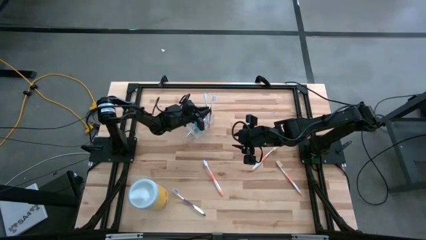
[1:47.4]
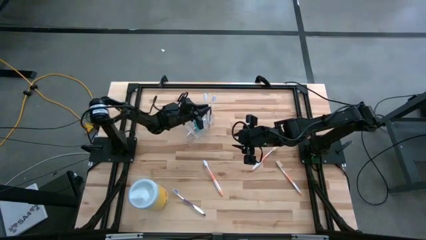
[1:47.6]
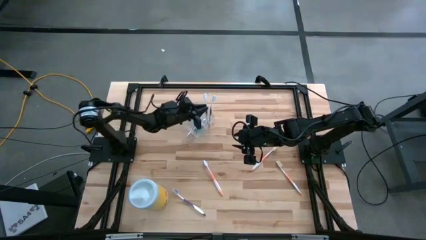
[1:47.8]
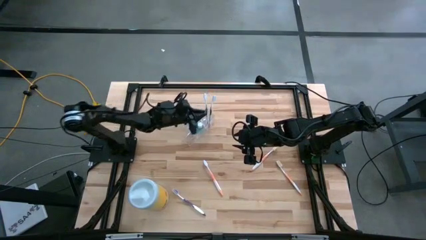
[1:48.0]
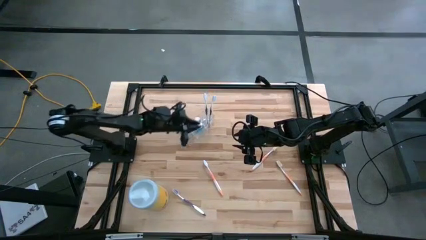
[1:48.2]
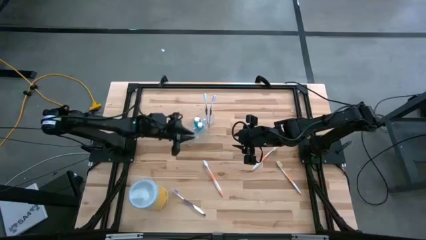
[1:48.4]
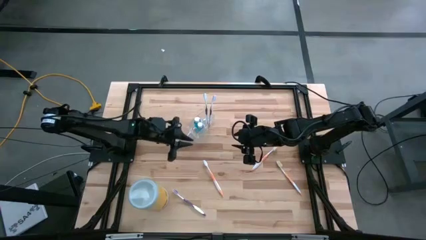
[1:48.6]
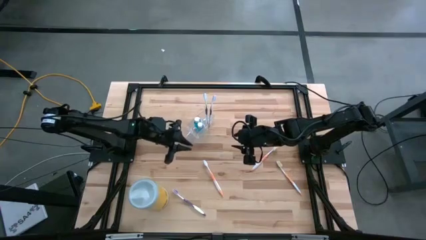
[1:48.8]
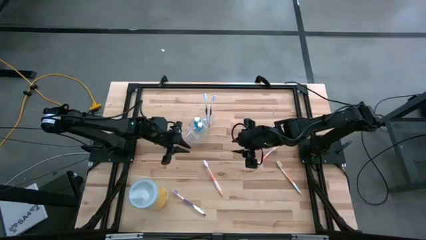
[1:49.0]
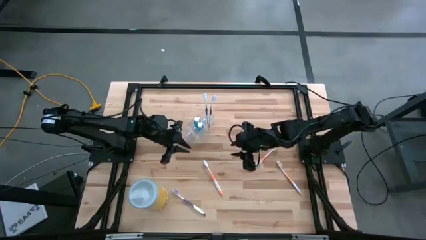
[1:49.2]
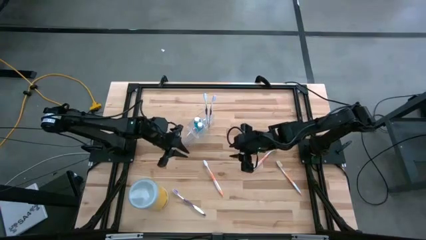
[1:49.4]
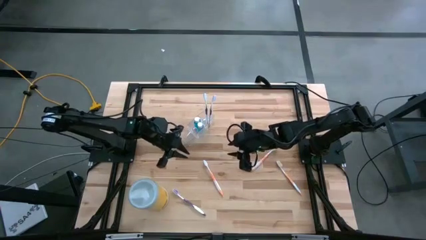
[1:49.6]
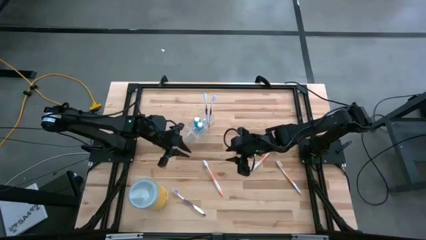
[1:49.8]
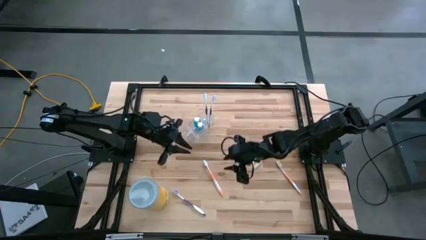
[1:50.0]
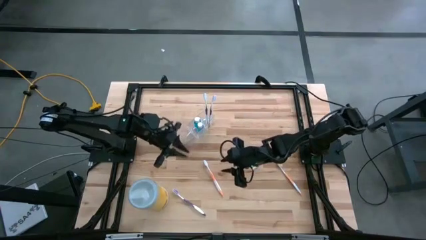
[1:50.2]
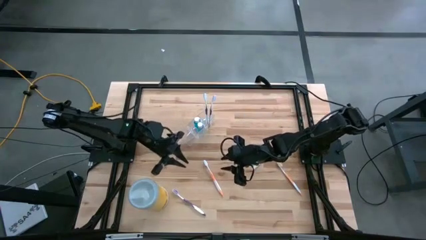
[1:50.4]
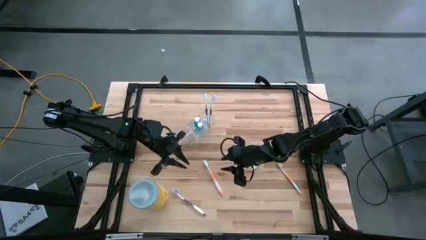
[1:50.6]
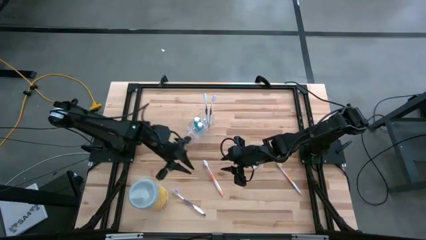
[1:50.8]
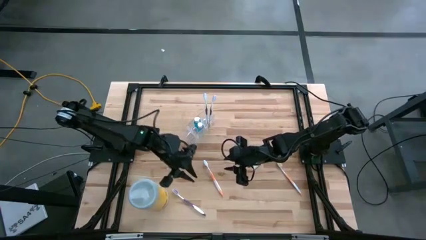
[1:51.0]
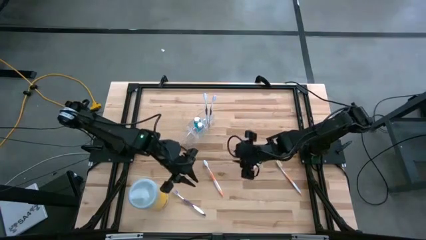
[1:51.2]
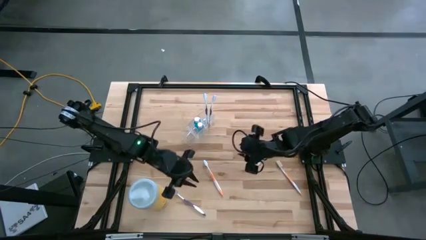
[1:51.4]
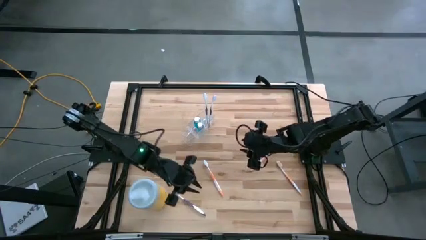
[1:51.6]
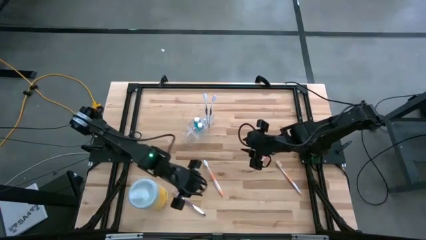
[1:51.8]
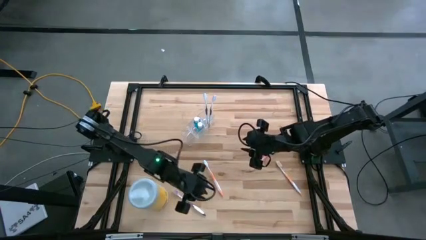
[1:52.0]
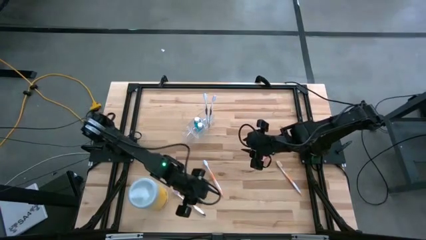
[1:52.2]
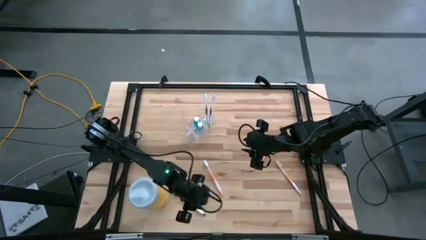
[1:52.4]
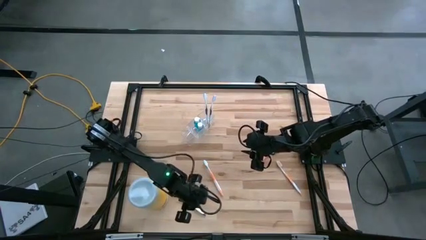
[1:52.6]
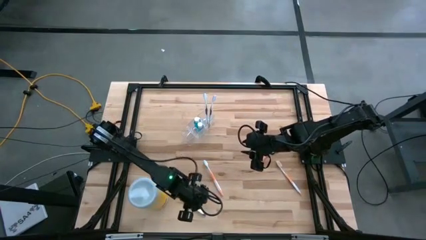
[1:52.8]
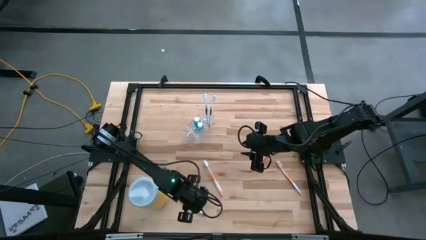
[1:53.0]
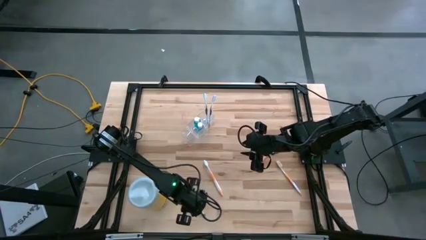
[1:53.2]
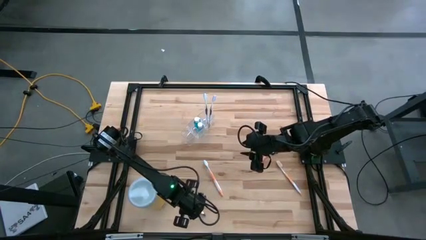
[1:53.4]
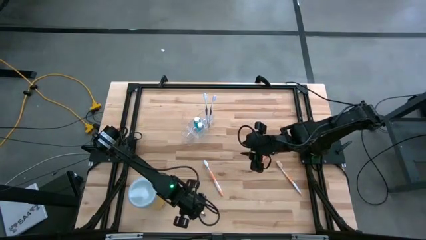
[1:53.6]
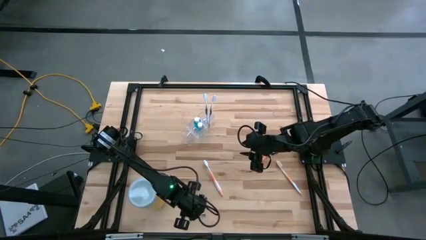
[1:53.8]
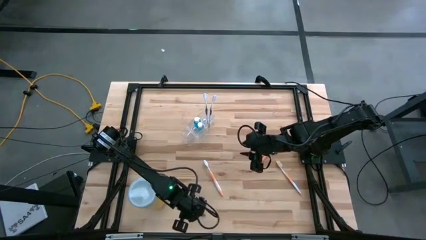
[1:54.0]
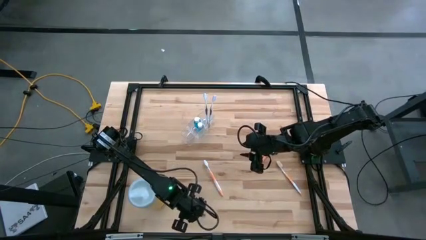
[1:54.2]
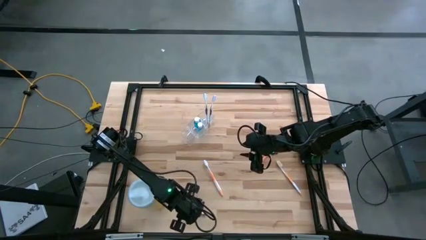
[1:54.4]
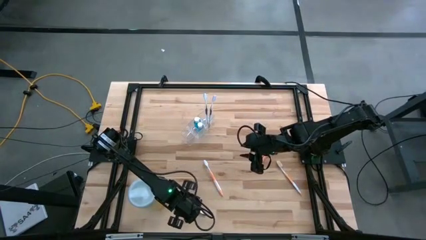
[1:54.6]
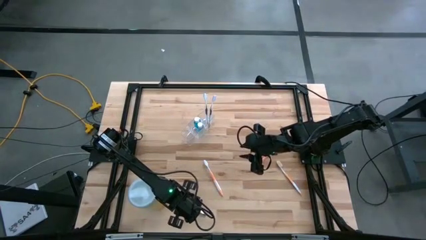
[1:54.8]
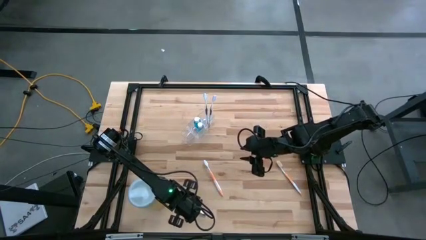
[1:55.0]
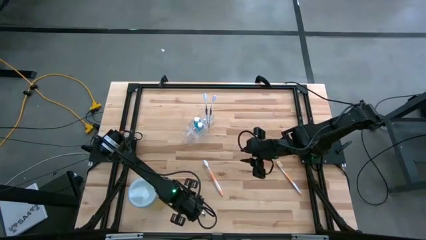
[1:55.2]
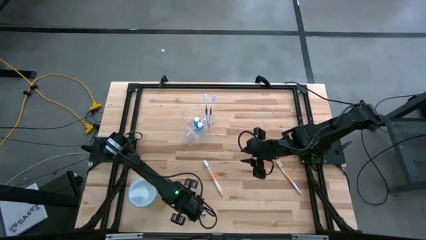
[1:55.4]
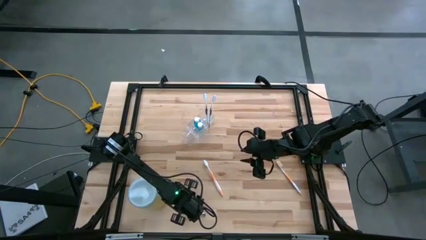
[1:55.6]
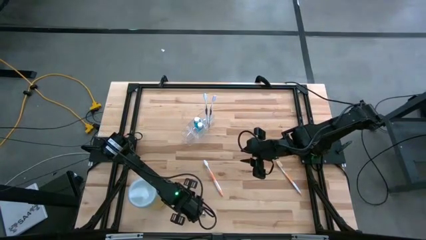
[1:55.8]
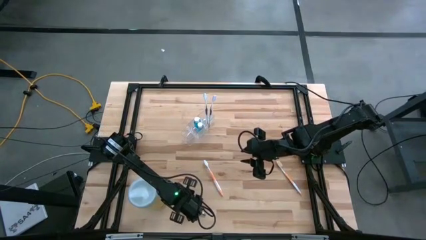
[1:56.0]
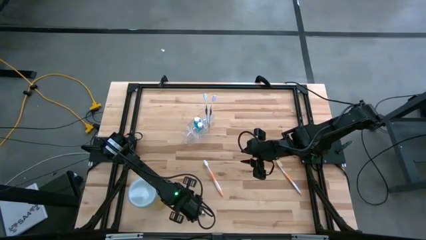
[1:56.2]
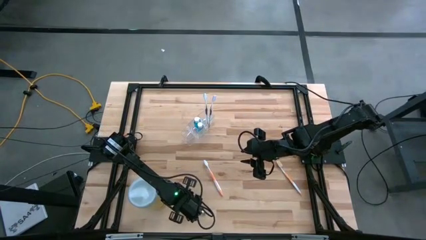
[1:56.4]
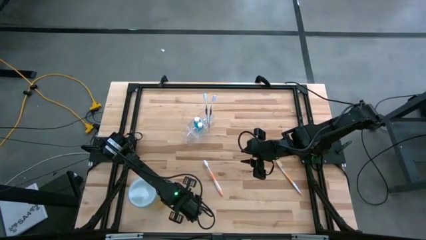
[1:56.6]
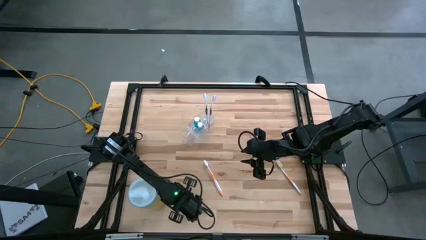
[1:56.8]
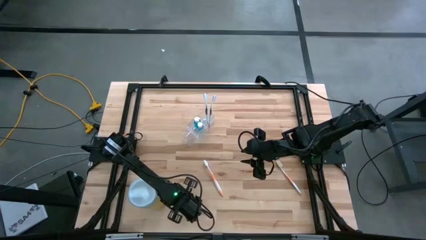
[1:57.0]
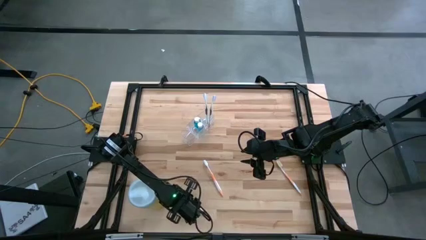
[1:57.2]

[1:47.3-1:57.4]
Task: Pick & Place toothbrushing station
Put the violet toothbrush into the transparent organizer

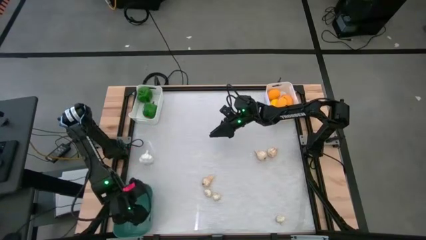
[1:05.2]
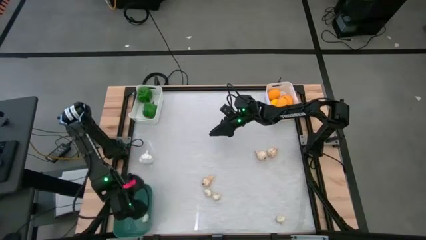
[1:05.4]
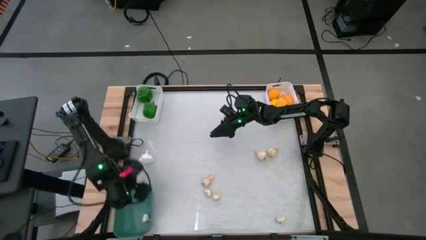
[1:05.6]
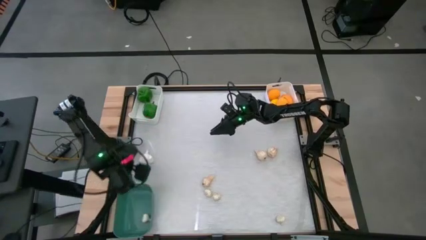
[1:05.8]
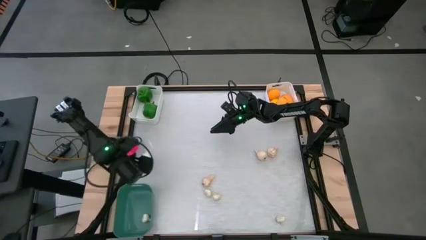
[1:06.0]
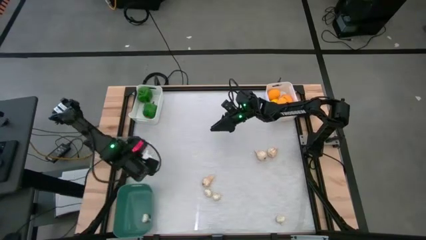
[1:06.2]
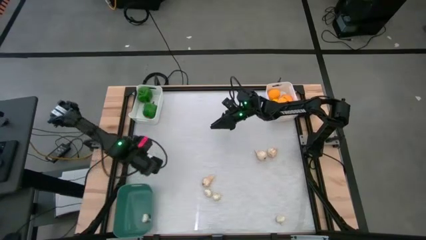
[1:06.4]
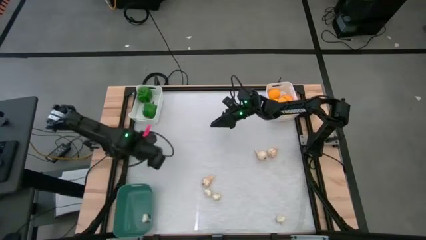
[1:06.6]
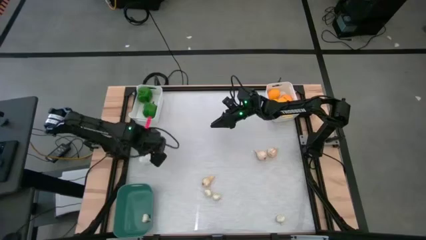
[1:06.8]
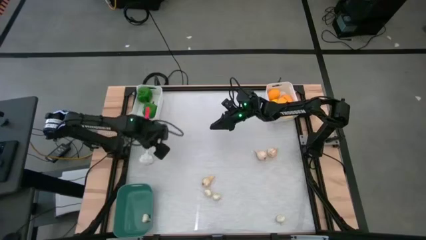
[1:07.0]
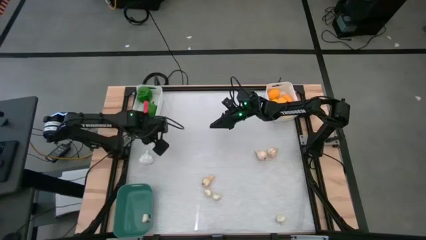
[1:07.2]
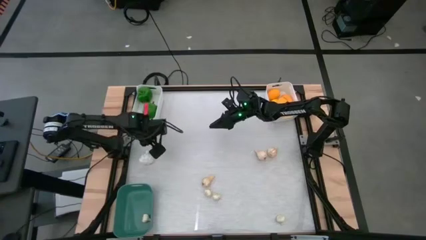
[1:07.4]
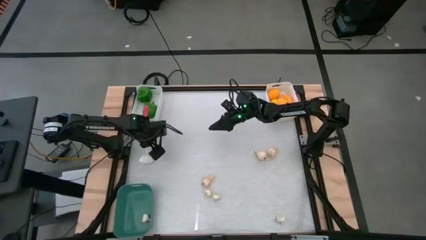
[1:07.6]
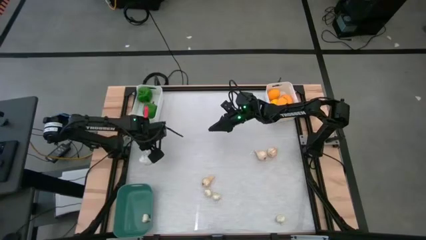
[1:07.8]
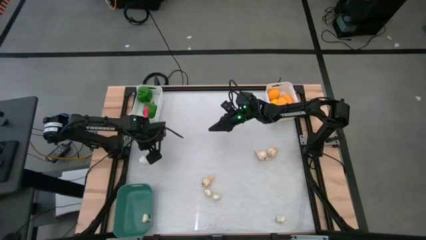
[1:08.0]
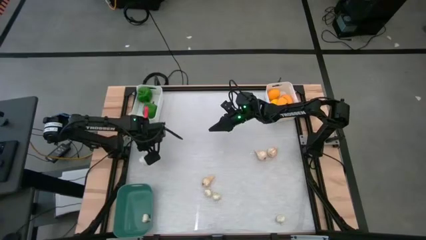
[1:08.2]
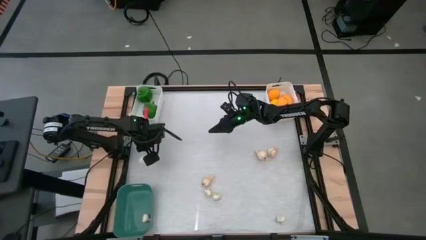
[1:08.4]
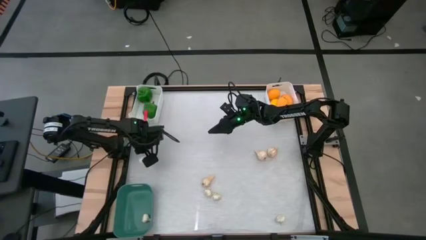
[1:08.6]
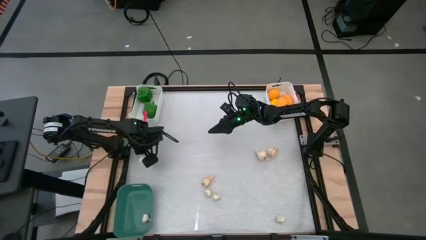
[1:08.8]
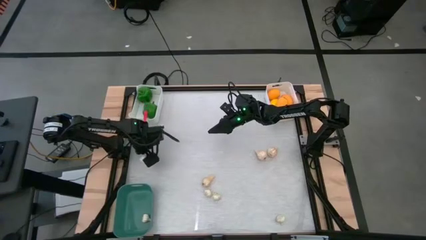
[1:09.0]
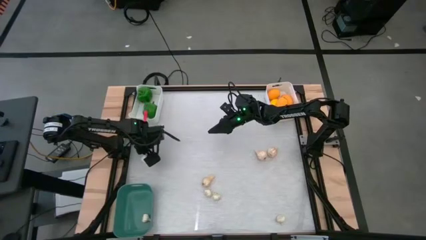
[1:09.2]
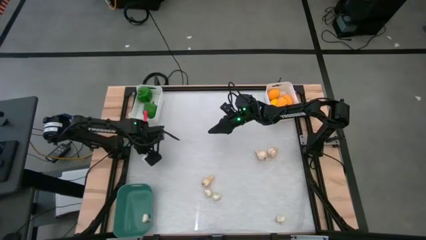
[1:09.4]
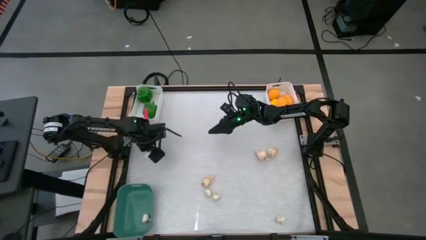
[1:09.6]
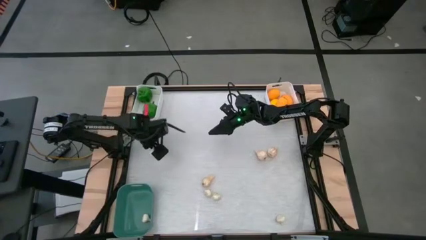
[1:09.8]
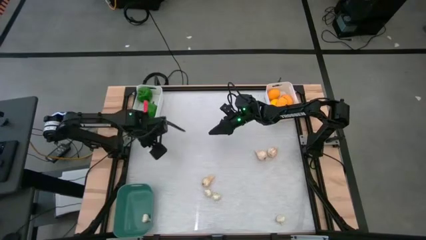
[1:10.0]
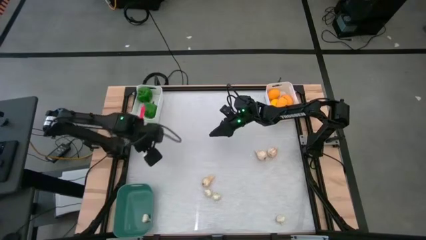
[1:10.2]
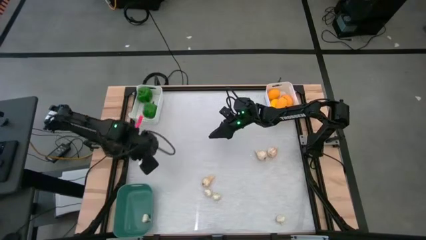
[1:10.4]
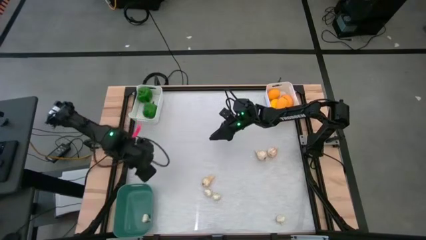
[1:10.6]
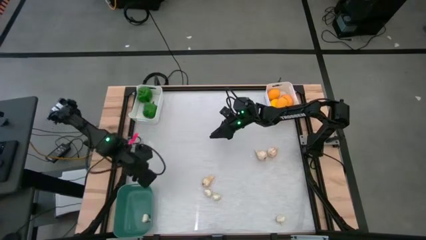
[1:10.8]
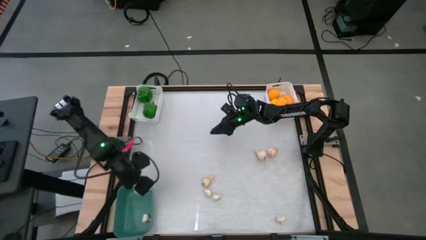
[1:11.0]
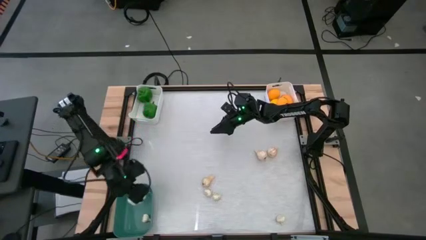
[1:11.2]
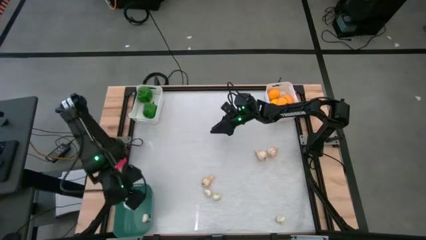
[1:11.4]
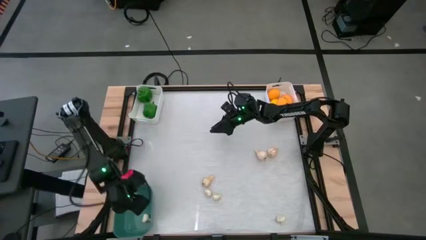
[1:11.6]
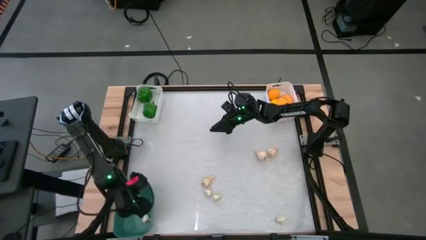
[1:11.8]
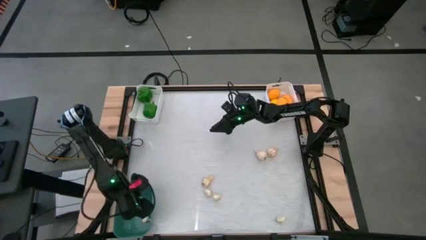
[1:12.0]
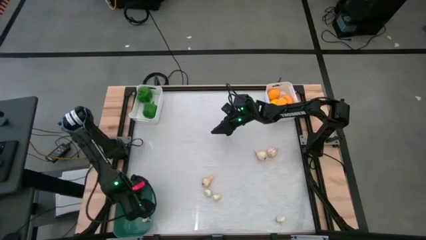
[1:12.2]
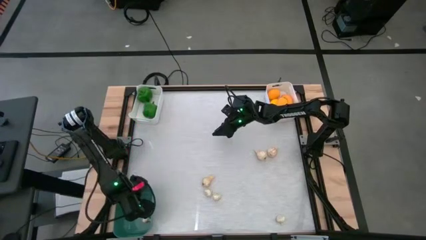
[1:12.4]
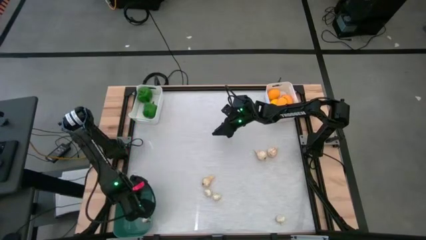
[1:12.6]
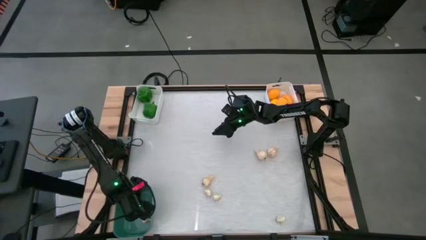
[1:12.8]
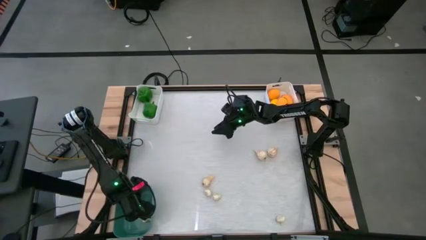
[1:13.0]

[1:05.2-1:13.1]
Task: Sort produce into baskets
Put the white garlic into the green bin
